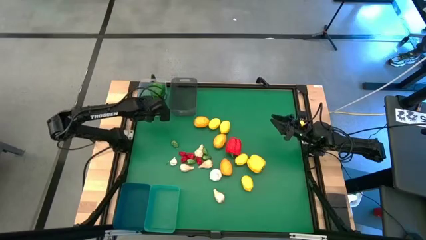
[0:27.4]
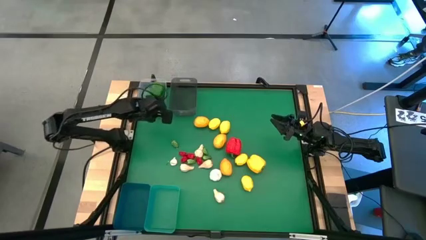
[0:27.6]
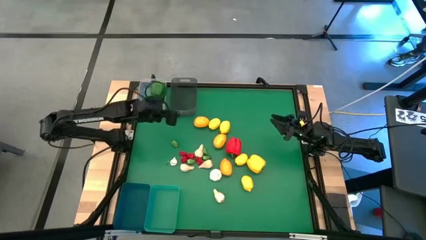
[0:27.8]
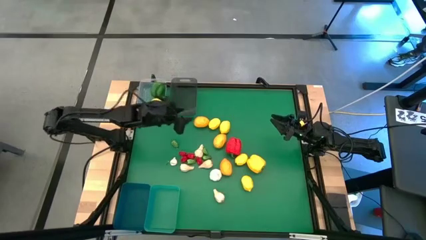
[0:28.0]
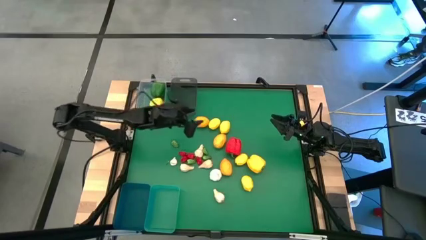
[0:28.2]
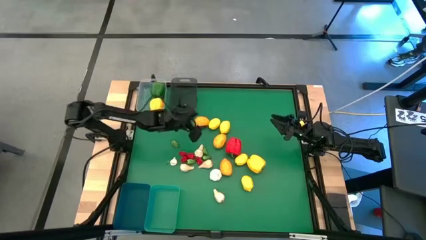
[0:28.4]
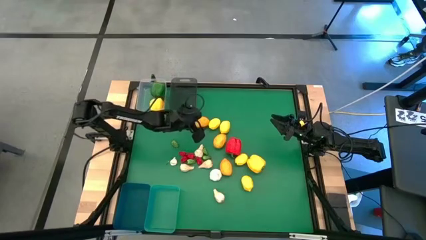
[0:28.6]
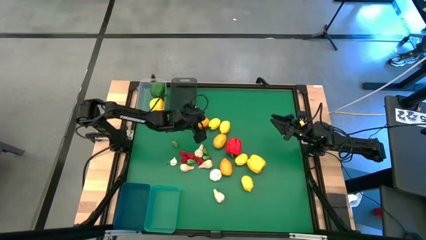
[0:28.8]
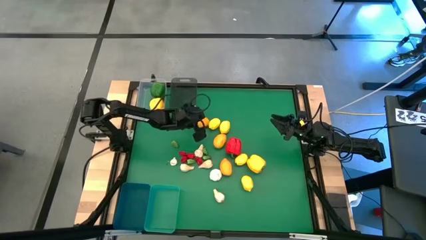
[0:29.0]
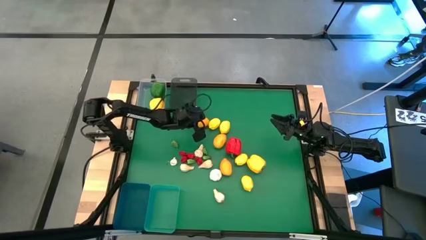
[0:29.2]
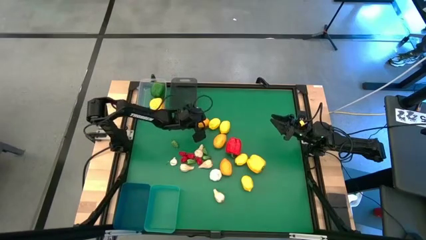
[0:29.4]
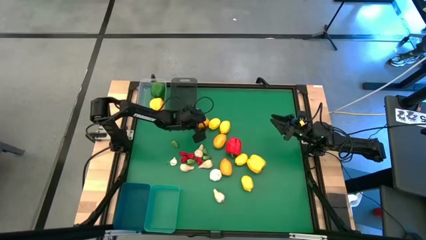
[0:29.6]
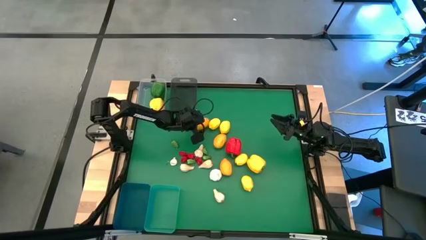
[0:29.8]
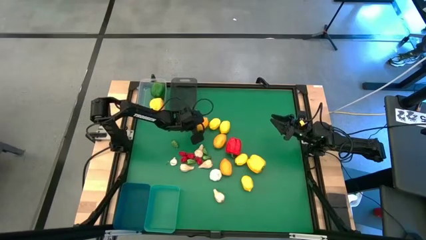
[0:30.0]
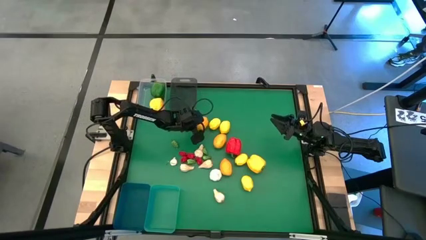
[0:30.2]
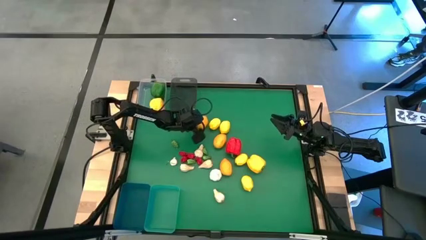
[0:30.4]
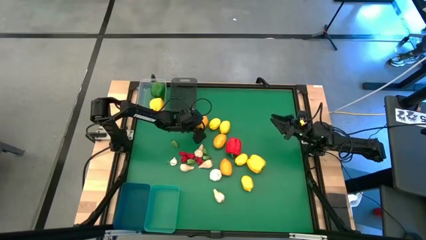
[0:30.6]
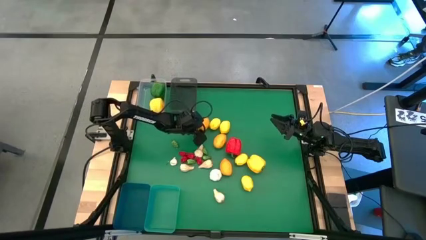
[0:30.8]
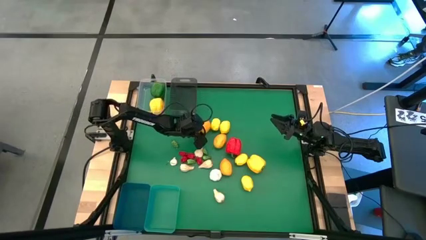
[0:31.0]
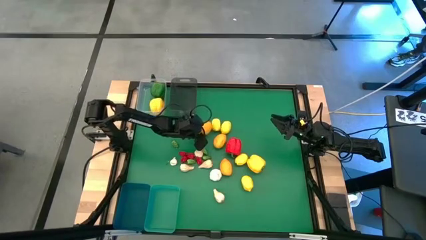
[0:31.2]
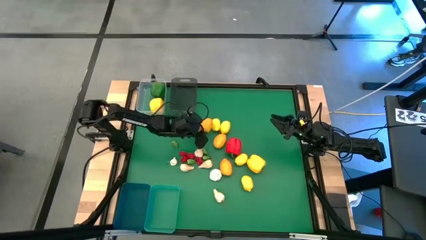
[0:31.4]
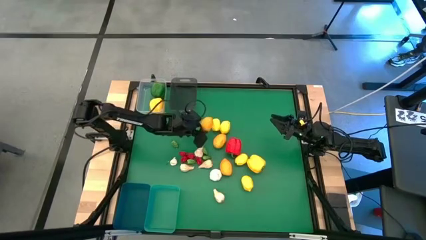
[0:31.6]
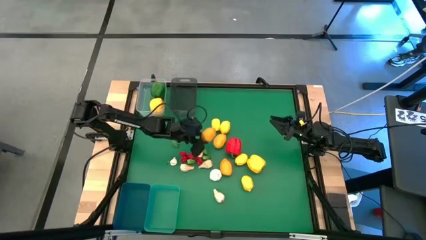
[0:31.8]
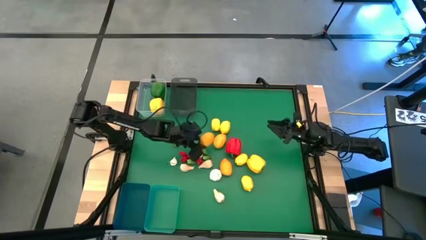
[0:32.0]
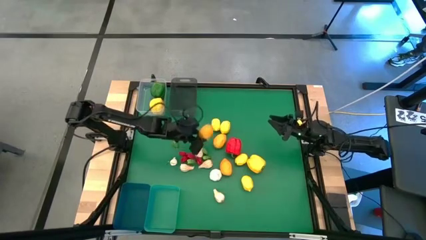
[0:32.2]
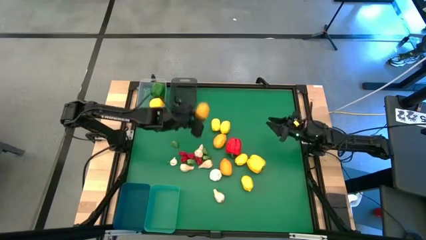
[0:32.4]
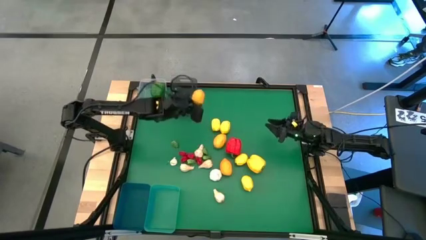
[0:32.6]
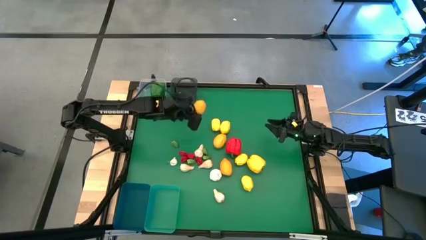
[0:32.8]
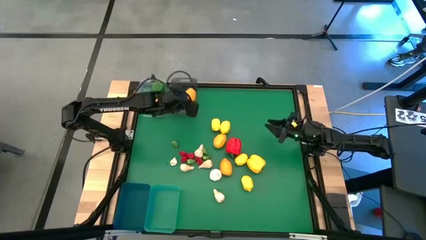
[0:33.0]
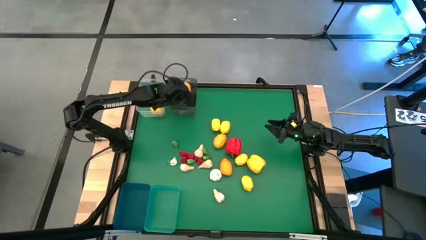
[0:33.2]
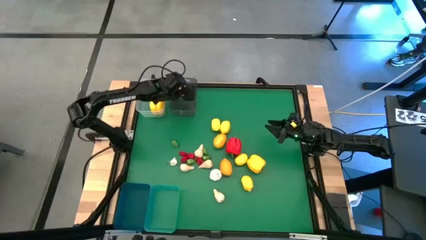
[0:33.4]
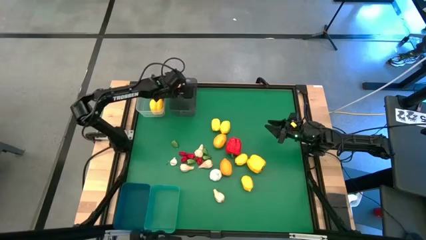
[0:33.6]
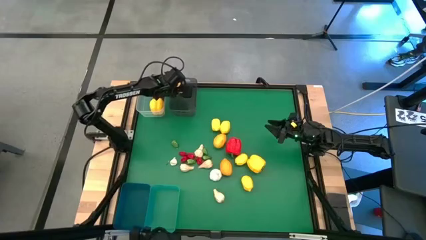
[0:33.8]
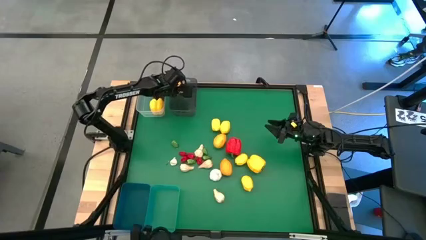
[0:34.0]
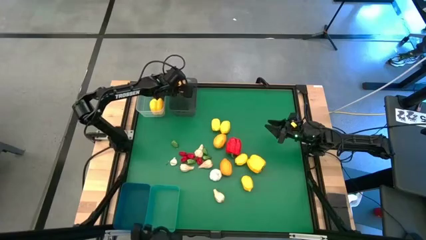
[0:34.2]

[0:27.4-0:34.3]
Task: Sort produce into baskets
Put the lemon into the black bin

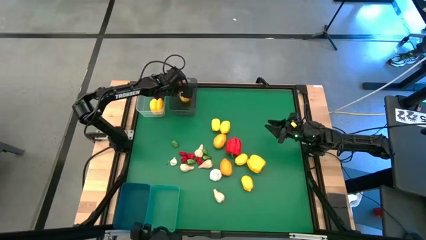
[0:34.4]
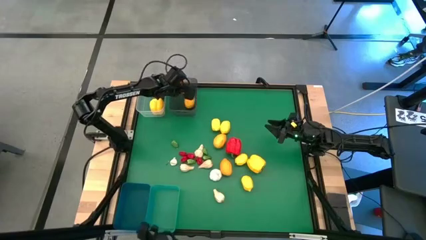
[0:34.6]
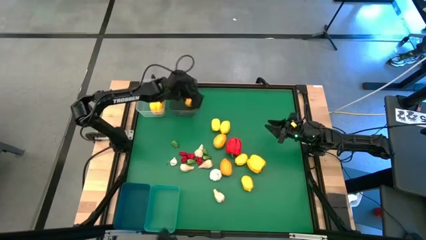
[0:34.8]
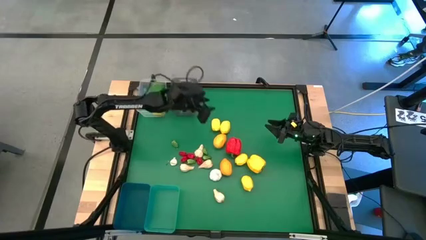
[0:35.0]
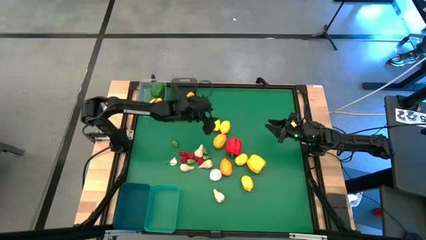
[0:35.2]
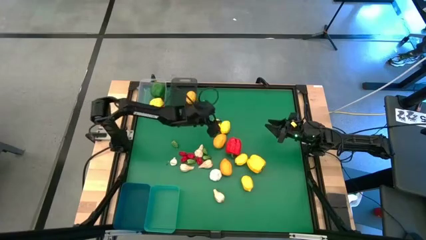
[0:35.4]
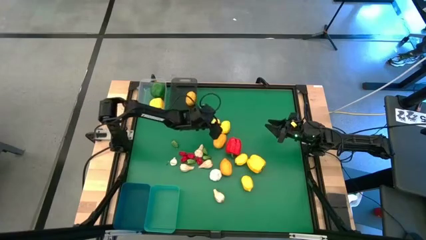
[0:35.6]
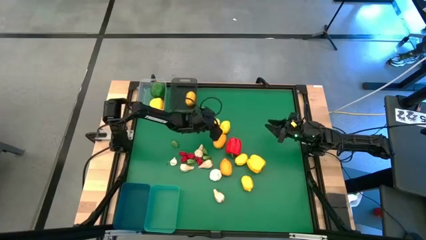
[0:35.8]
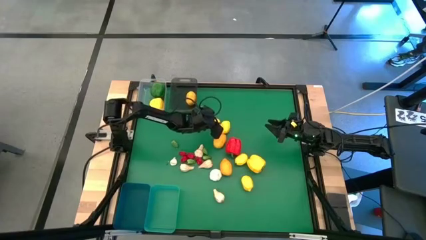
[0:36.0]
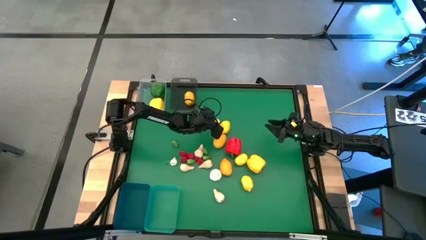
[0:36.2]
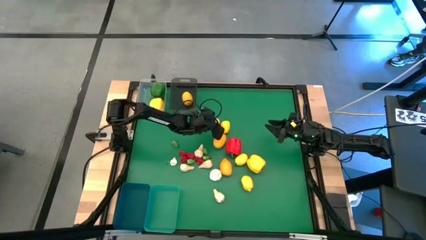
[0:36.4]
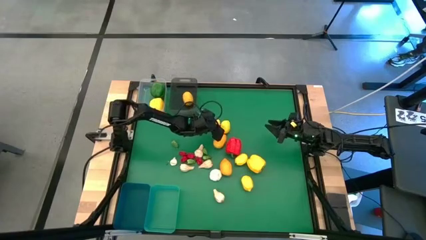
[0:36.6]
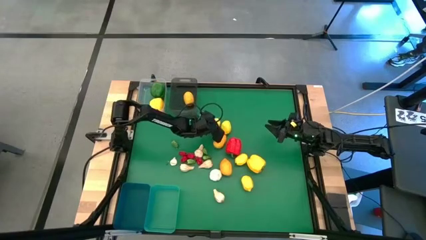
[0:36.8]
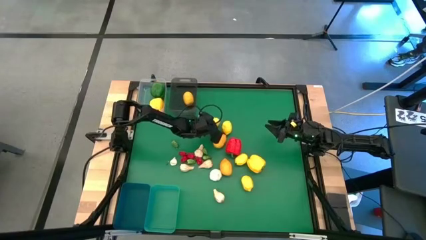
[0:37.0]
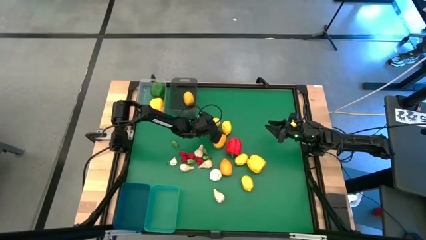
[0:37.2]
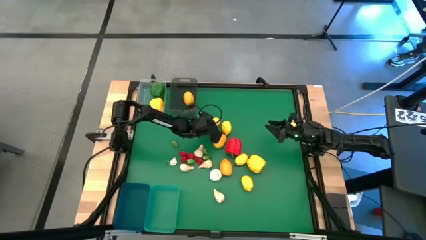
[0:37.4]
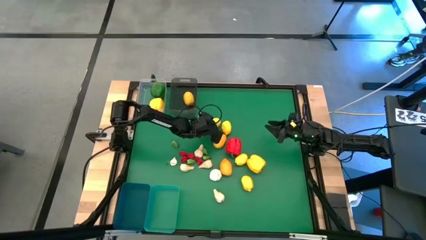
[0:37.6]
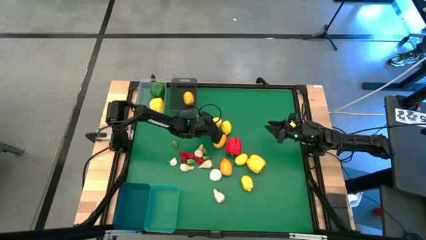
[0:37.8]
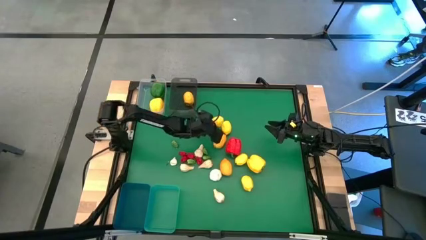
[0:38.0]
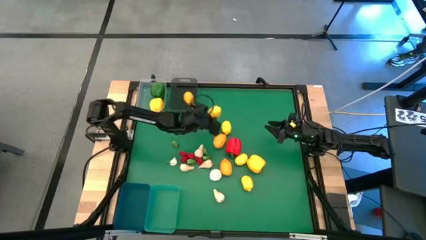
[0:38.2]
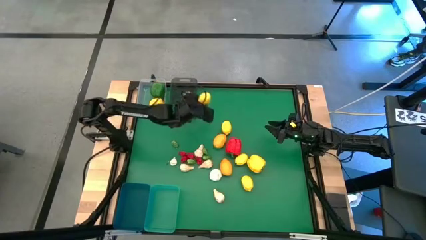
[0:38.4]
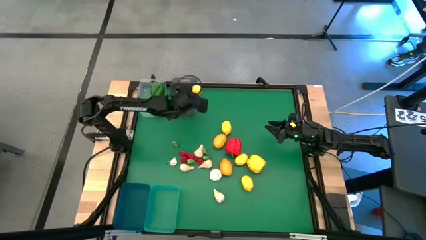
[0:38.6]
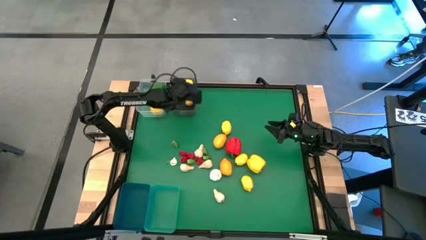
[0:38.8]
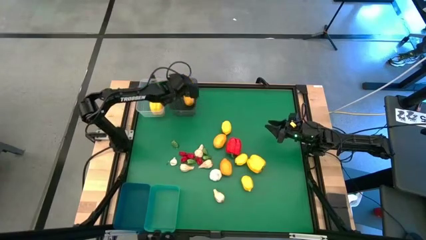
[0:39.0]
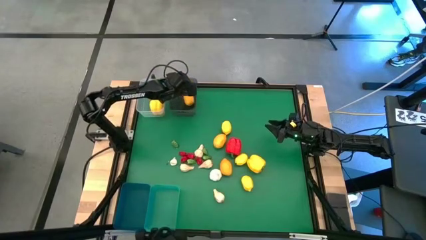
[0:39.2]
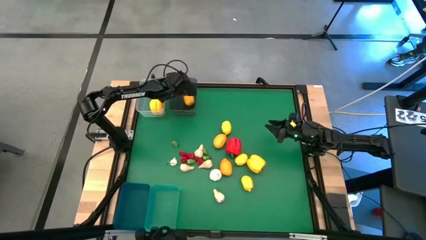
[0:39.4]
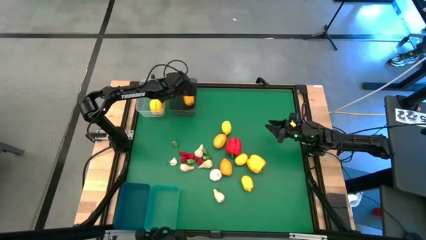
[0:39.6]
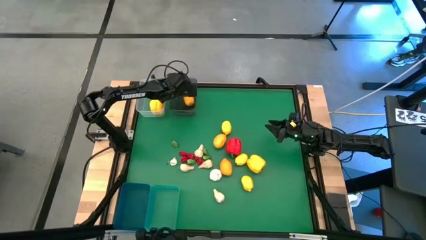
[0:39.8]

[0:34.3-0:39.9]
Put the lemon into the black bin

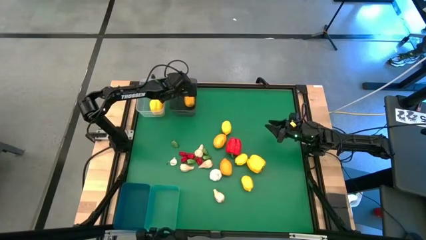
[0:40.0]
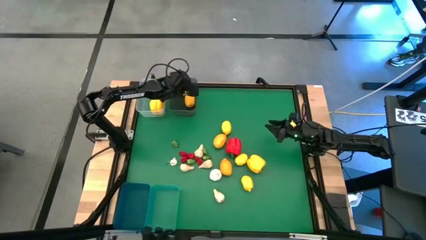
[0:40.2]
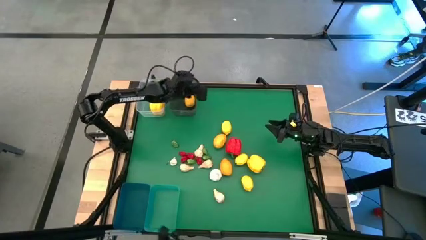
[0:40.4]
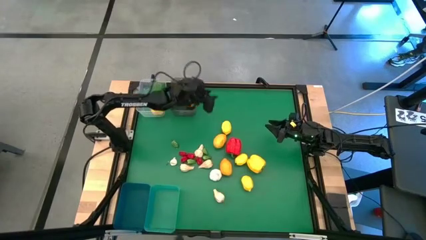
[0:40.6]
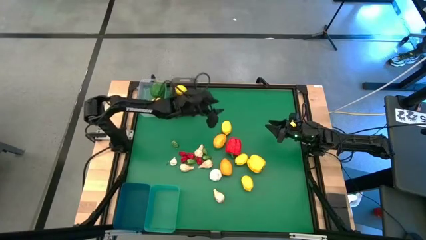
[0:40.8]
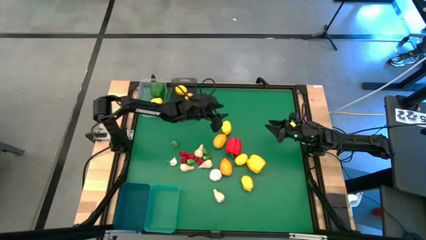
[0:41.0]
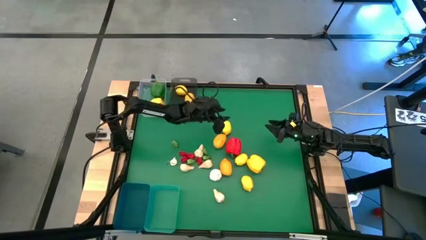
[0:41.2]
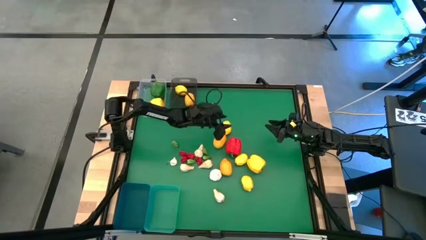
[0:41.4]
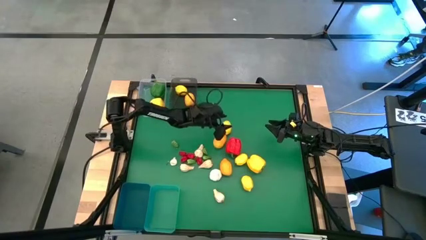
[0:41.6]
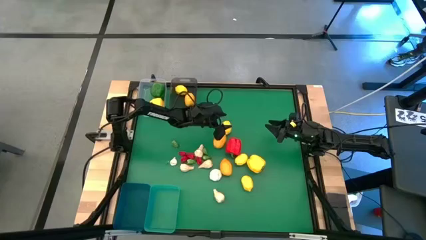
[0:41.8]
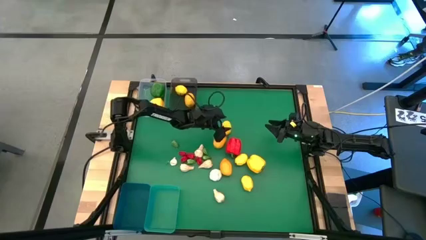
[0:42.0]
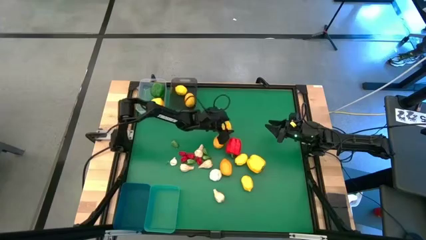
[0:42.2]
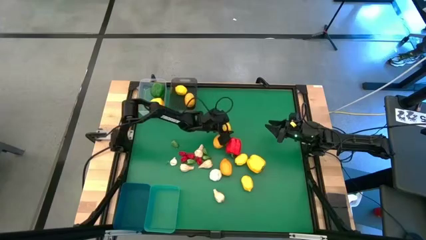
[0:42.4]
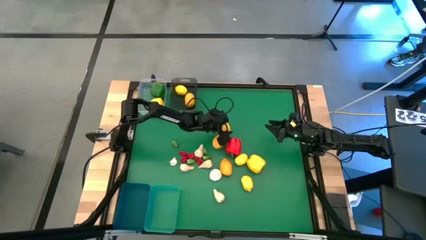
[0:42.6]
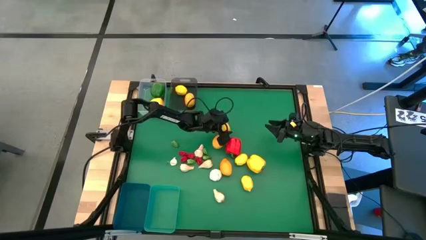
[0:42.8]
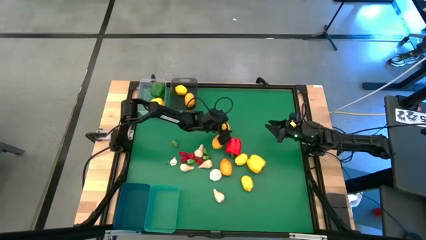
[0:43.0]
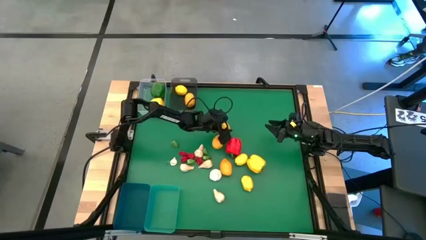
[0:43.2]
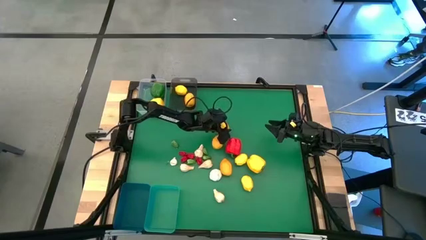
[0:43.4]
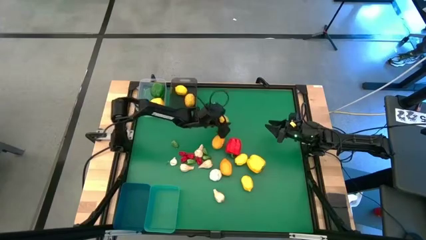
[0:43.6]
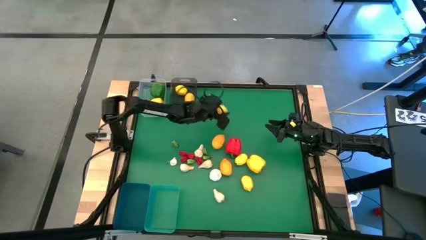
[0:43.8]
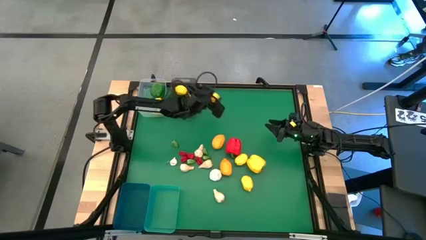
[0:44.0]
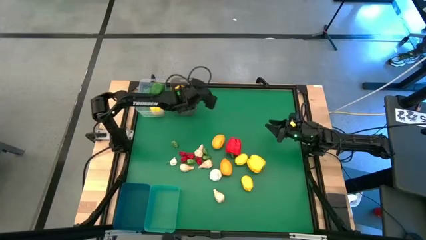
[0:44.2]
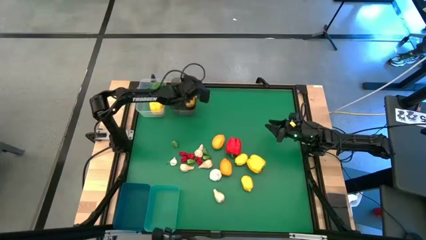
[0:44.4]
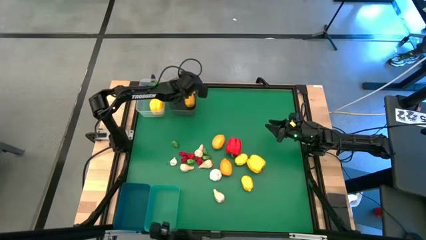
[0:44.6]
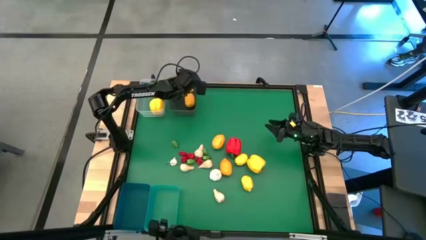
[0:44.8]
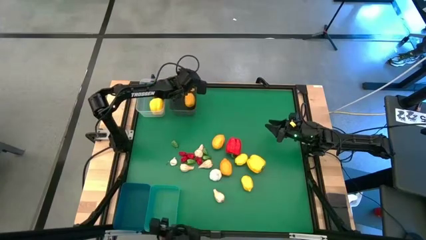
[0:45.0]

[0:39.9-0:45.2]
Put the lemon into the black bin
